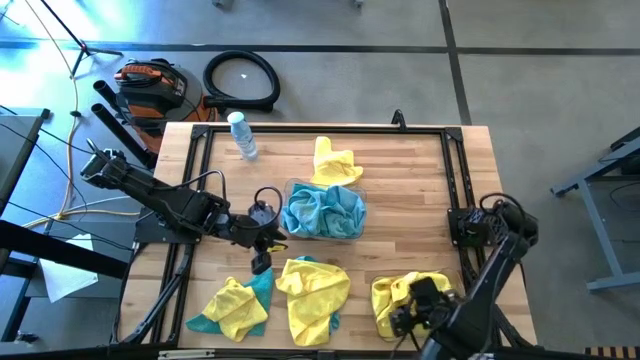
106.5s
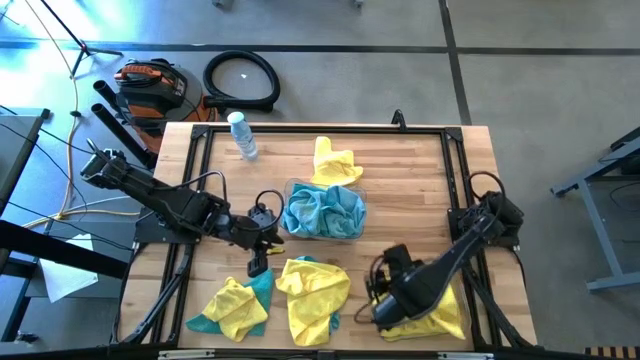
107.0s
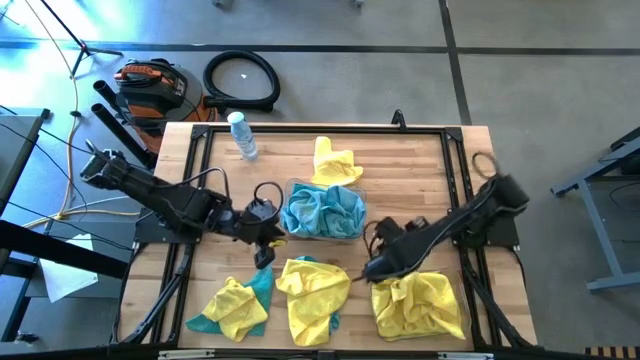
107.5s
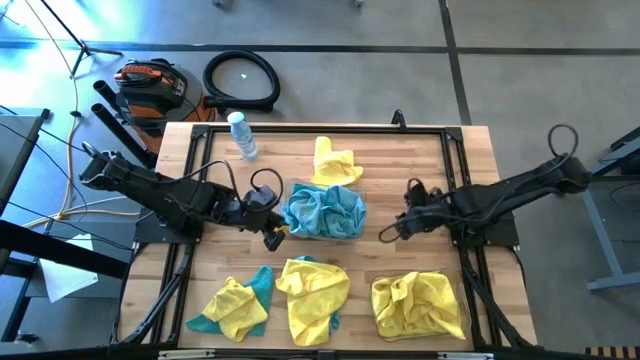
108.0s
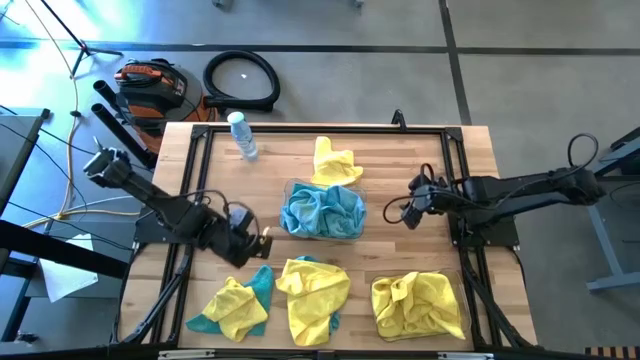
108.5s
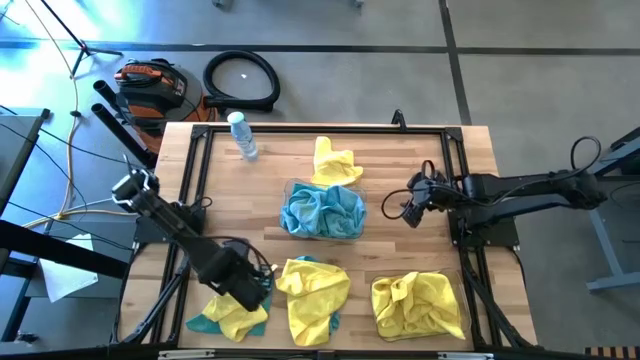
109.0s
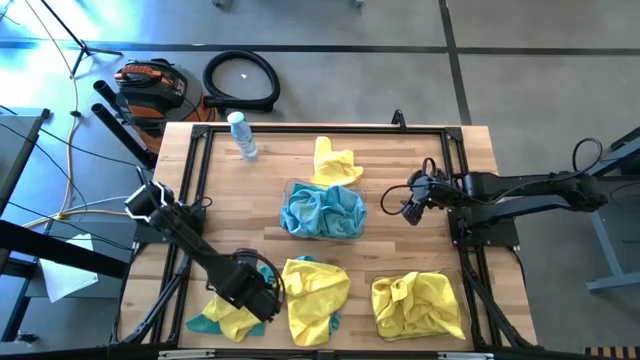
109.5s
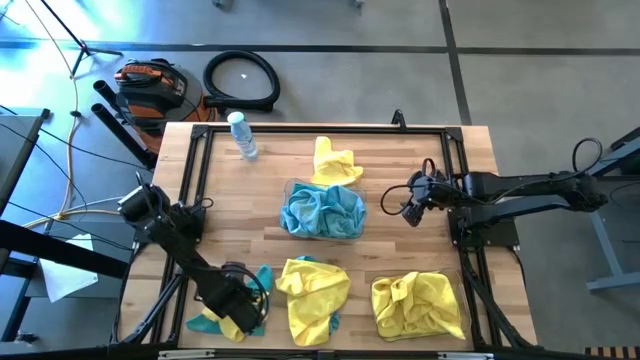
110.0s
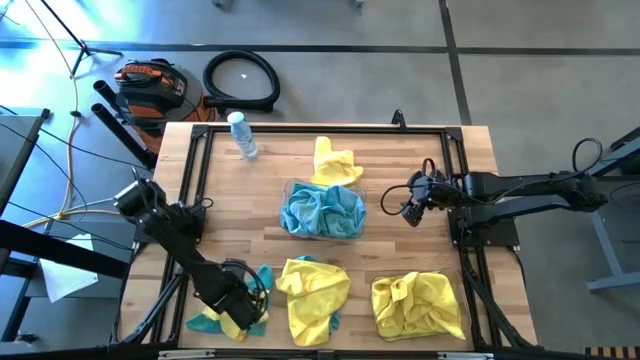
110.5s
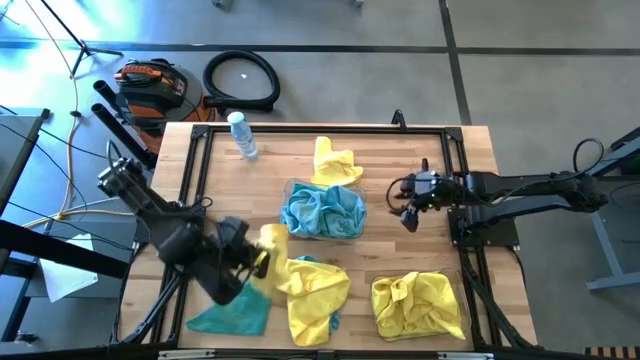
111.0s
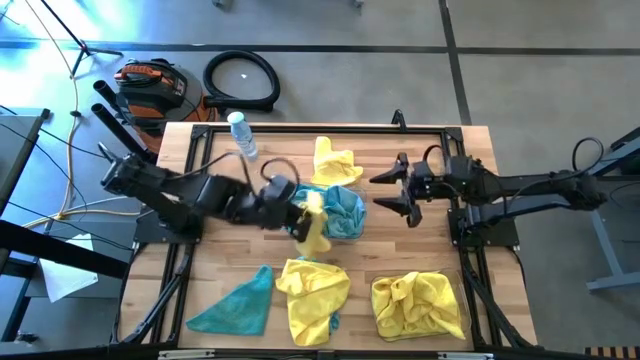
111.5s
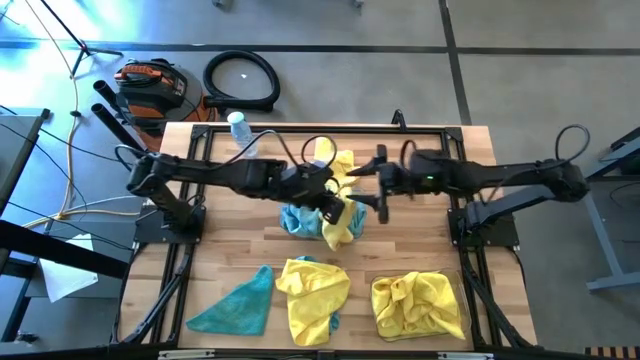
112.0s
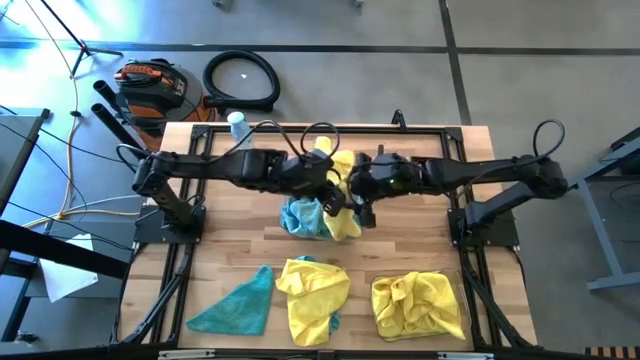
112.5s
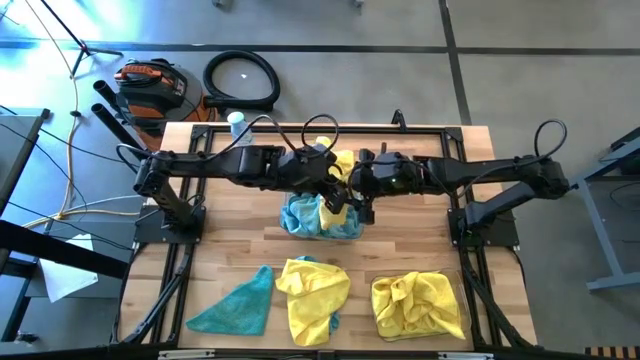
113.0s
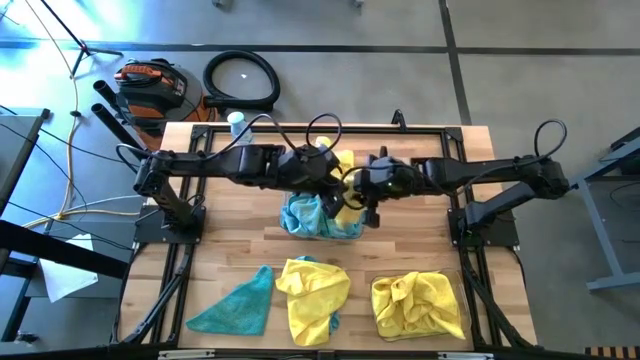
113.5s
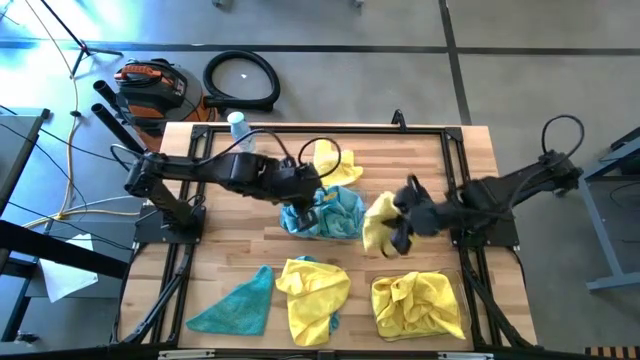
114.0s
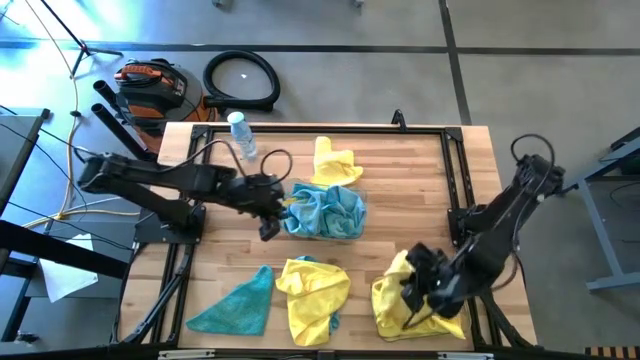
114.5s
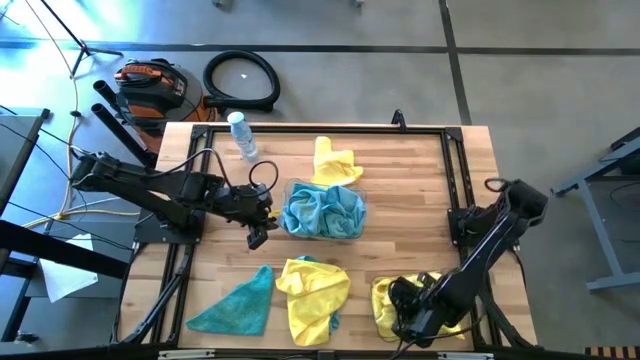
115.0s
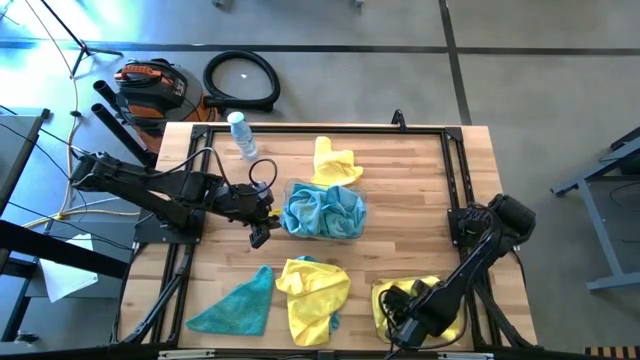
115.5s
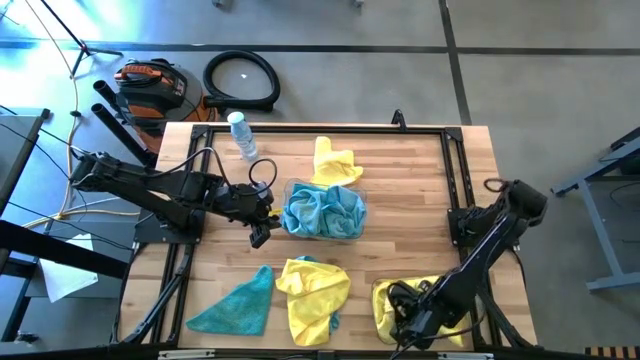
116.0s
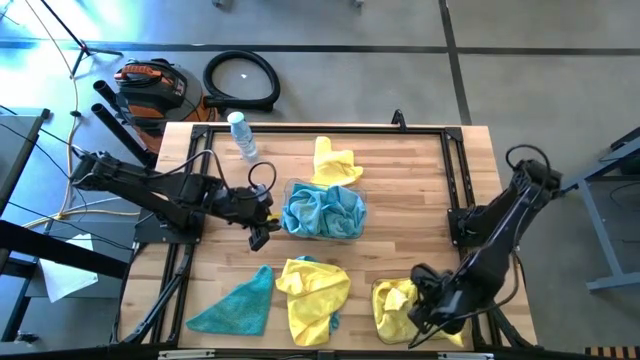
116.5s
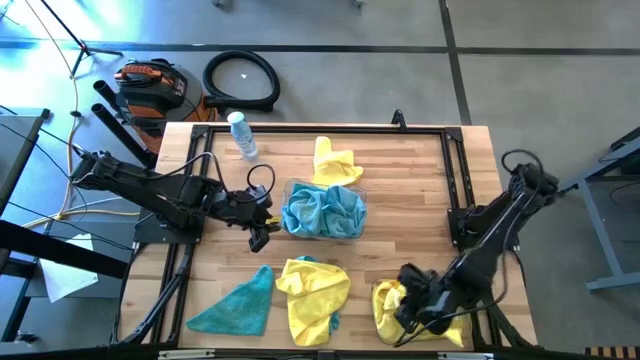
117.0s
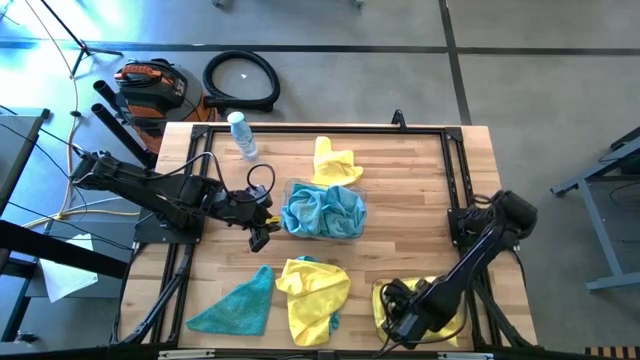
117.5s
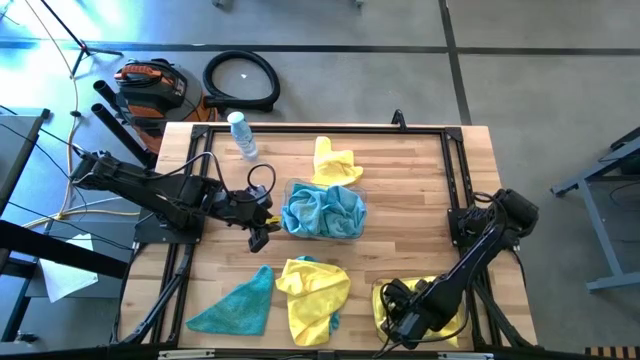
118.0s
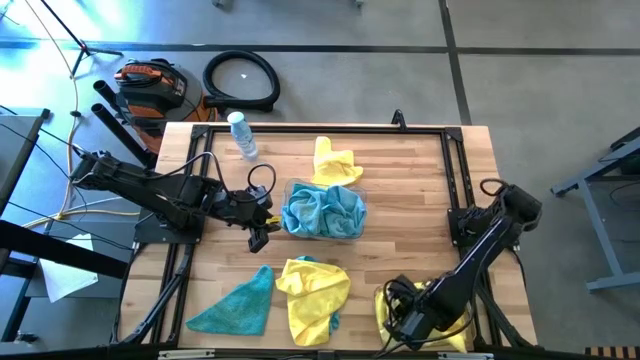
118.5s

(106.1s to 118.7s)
Task: Sort microfiber towel by color & place in baskets
Put the yellow towel in the bottom transparent bin

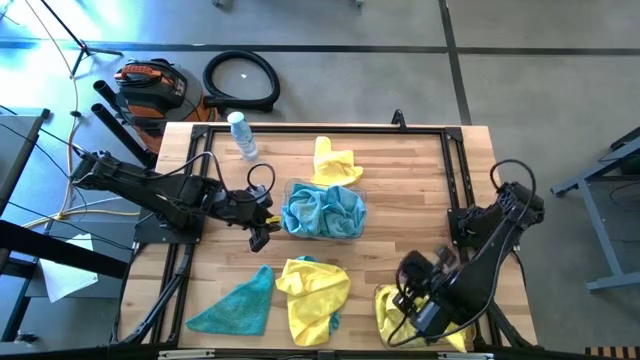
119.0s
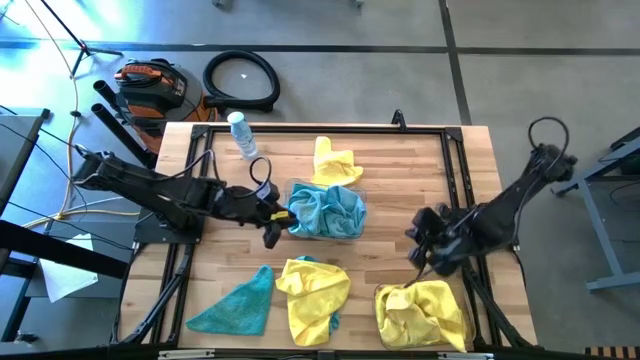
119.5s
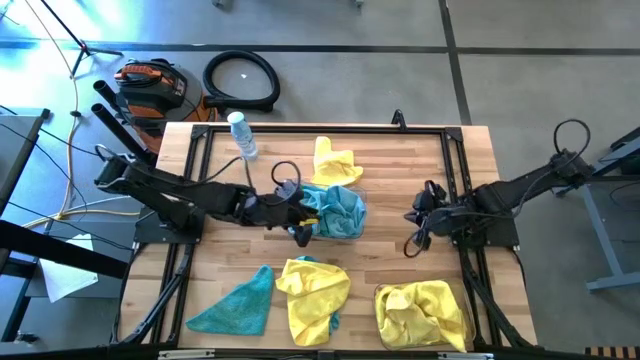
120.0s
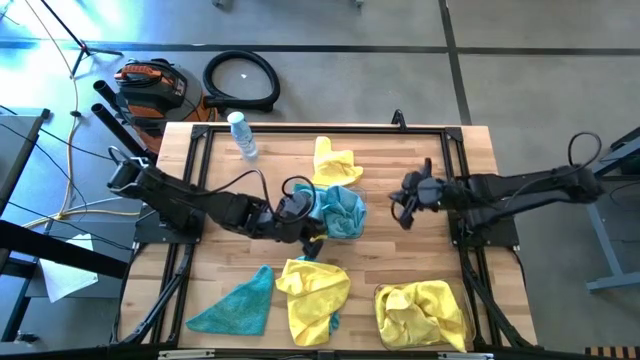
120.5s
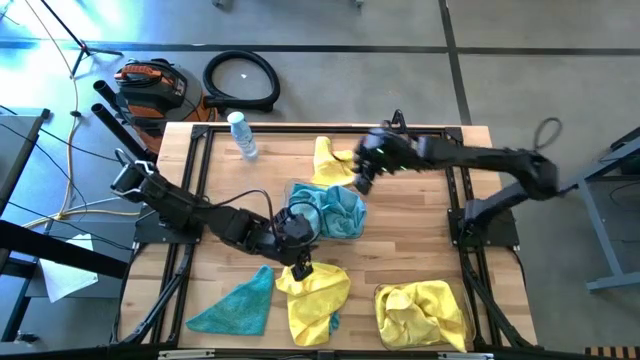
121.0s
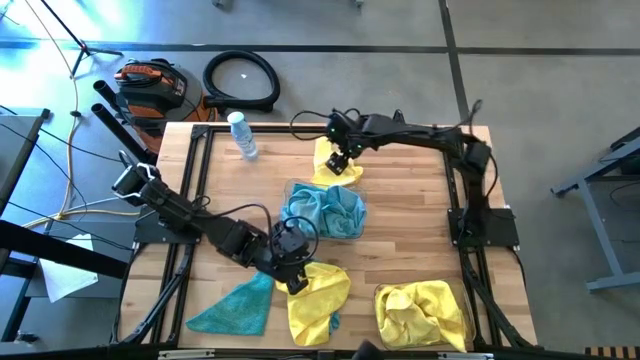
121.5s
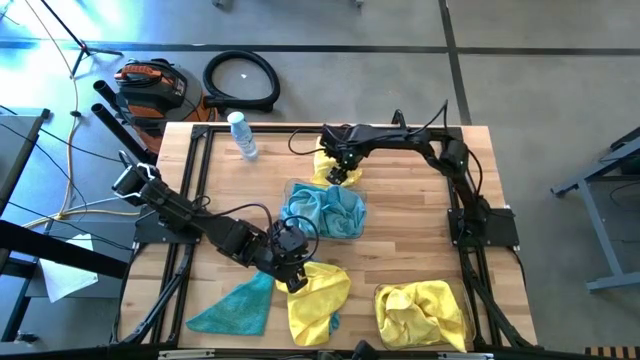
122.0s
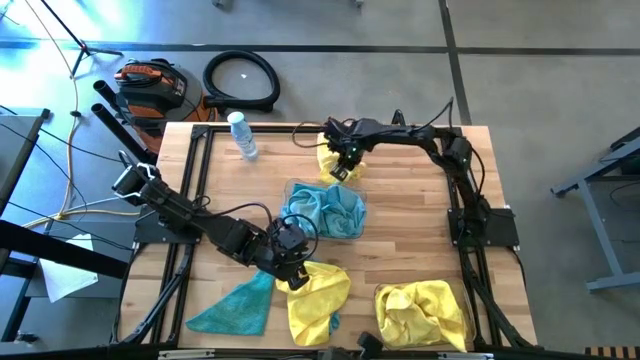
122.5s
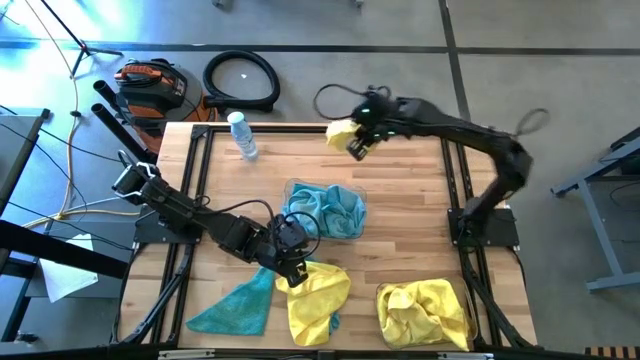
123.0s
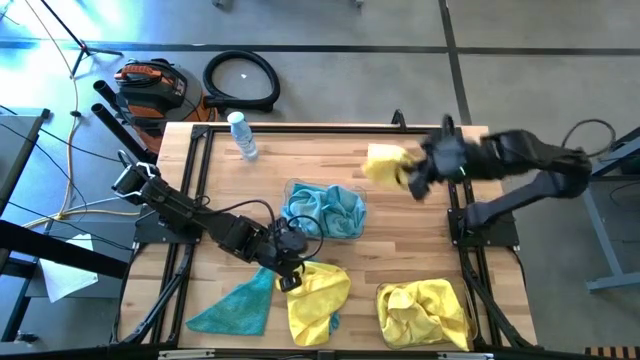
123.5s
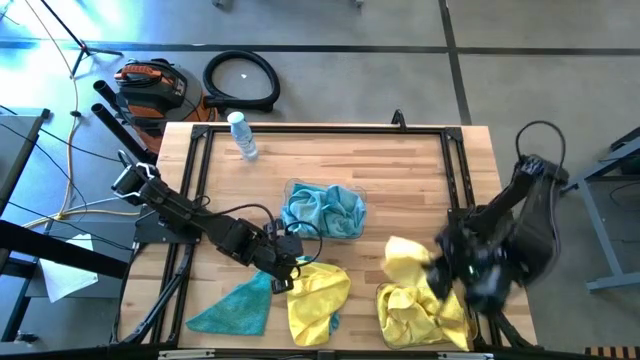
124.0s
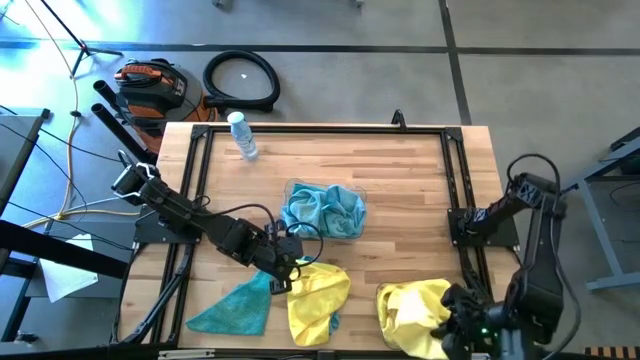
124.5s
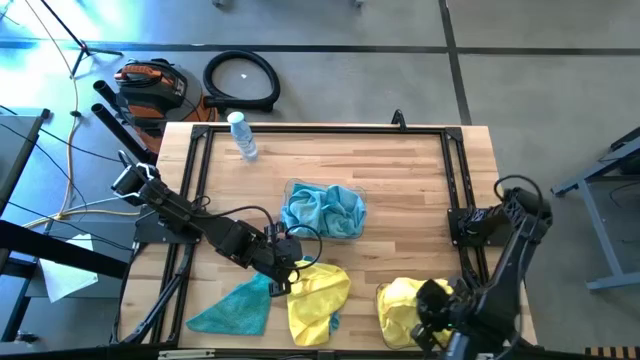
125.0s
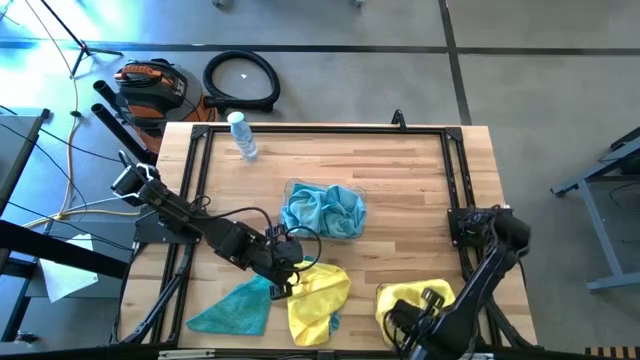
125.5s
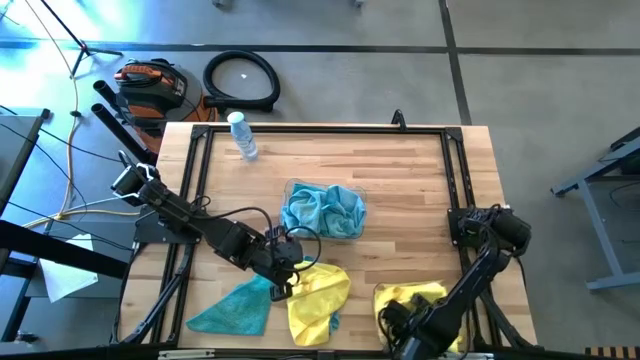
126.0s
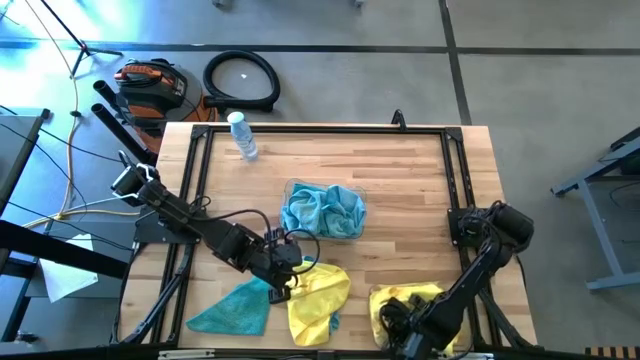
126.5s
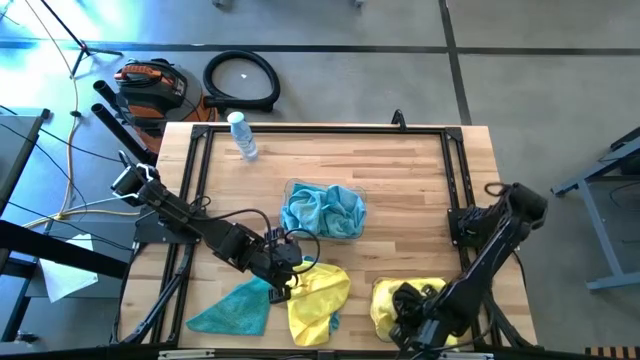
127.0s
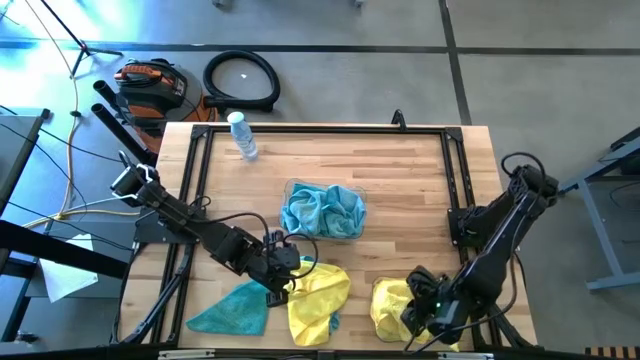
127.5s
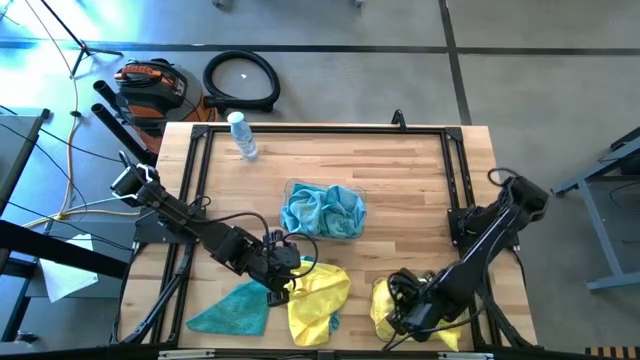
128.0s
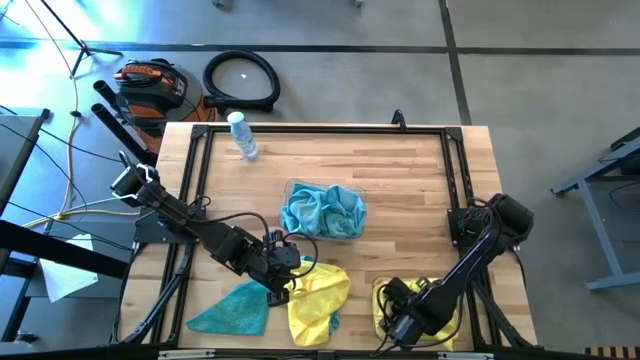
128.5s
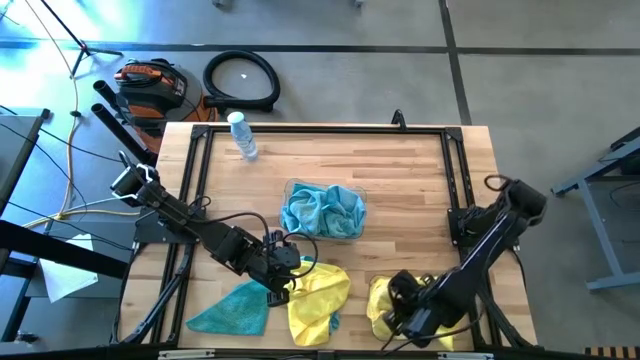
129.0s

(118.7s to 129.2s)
Put the yellow towel in the bottom transparent bin
